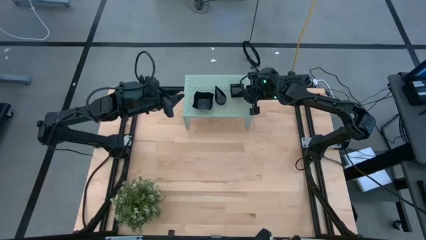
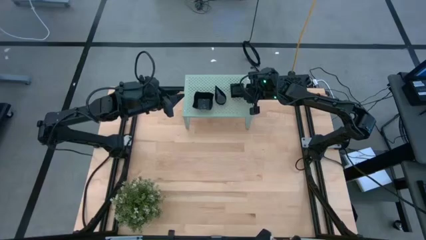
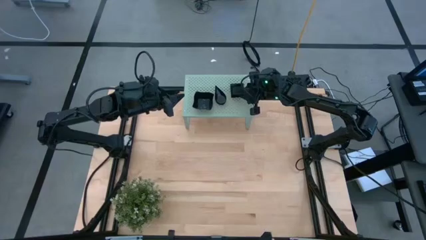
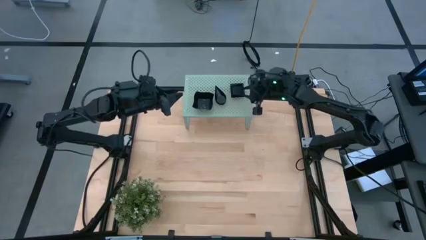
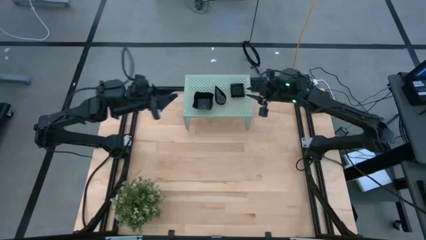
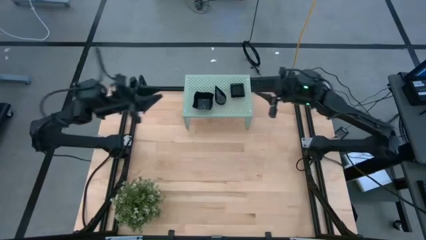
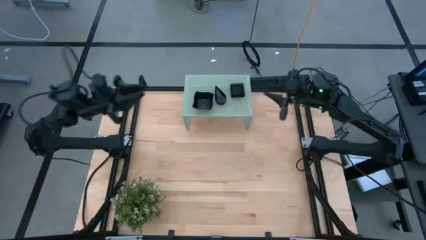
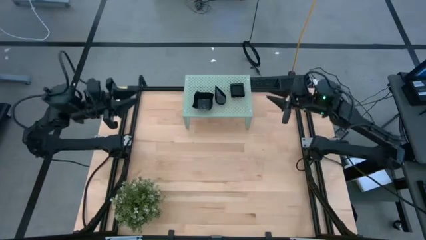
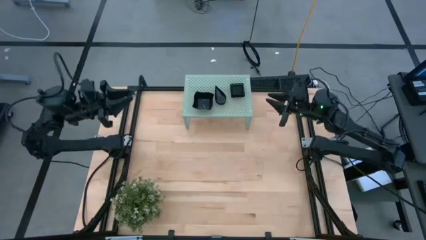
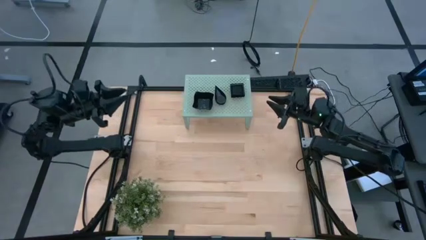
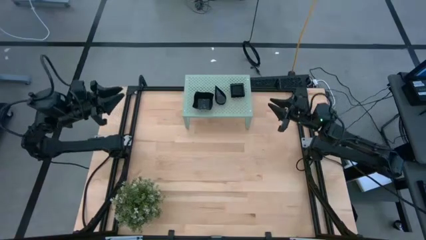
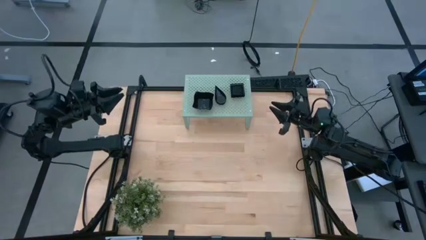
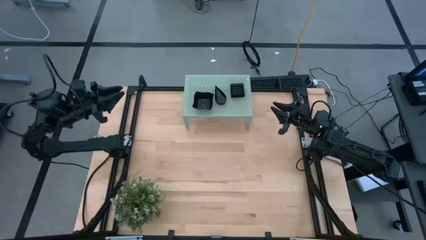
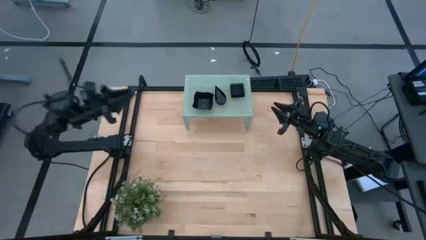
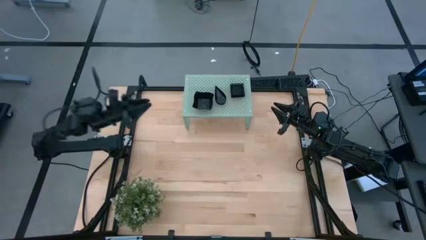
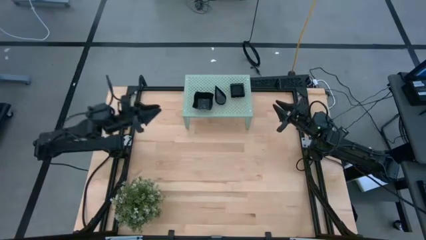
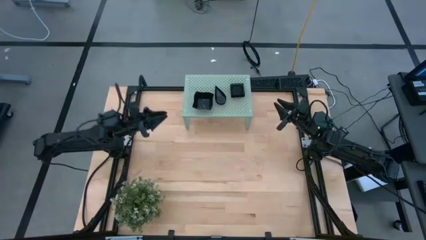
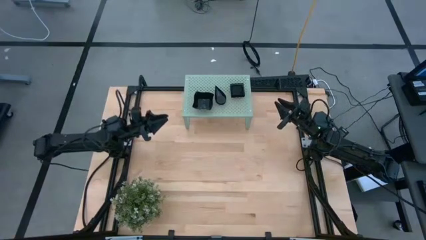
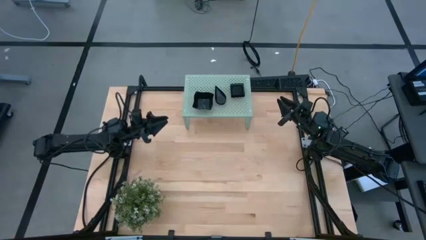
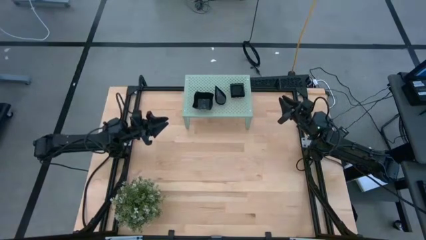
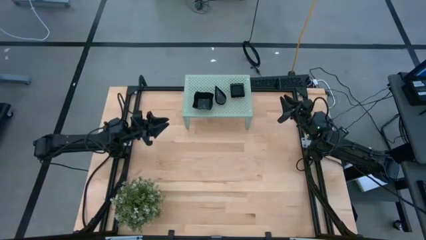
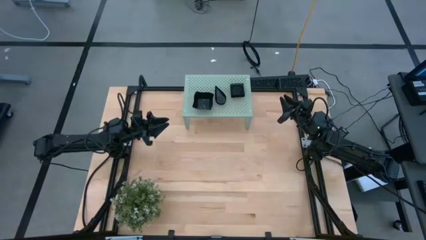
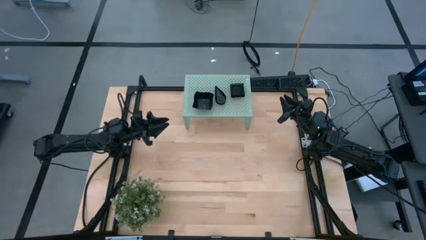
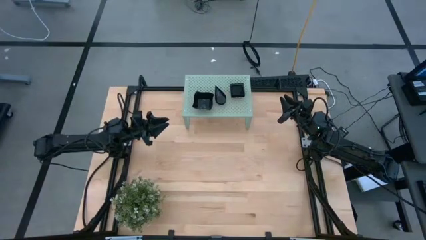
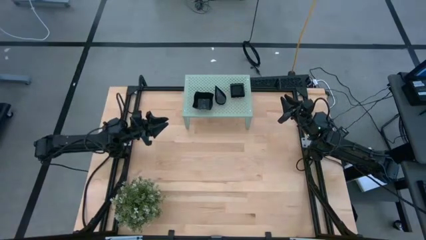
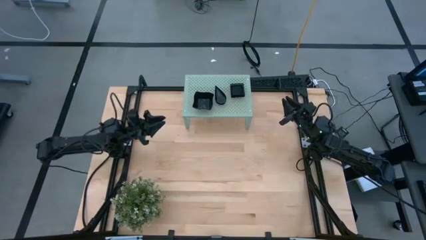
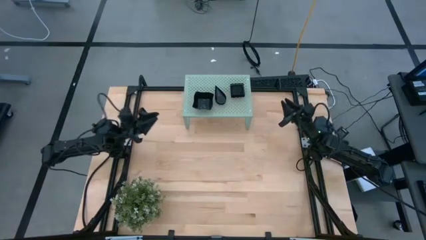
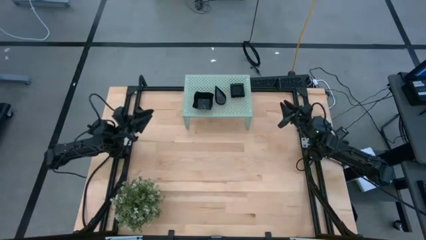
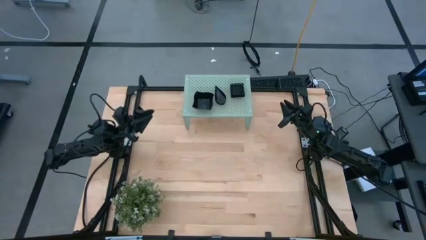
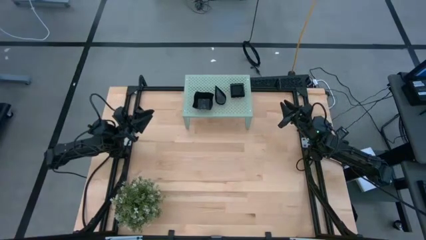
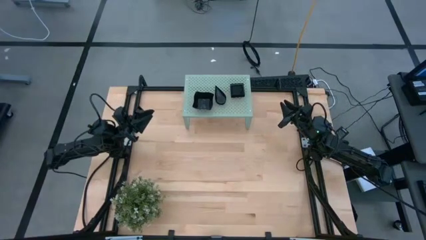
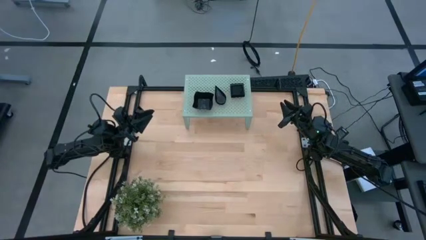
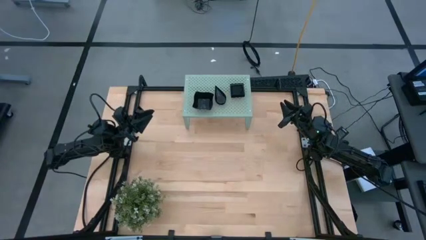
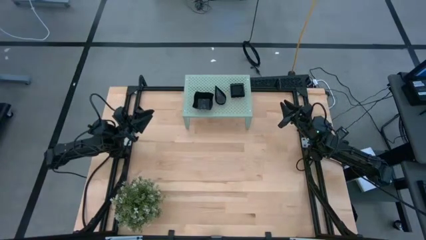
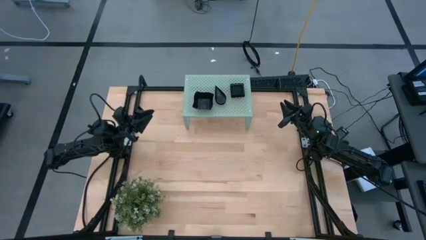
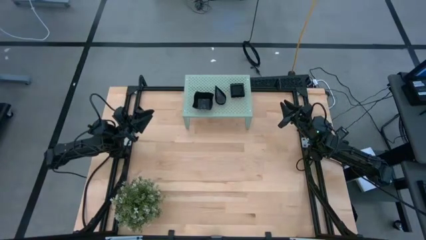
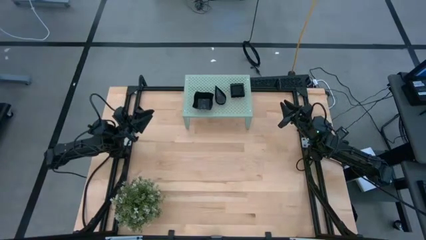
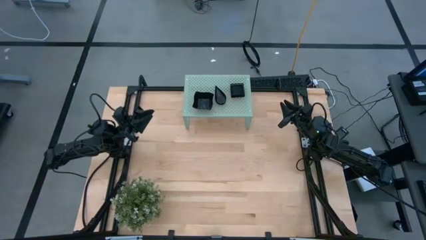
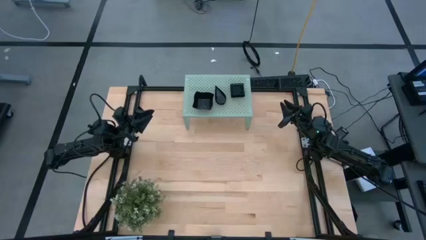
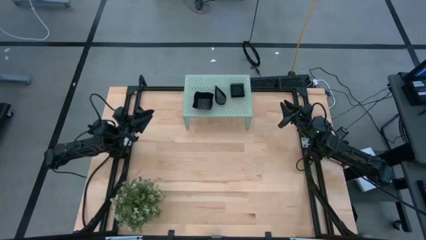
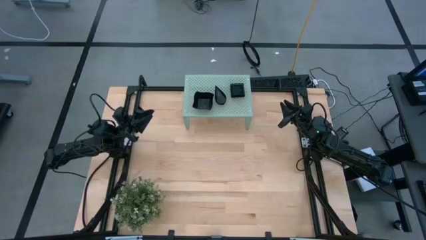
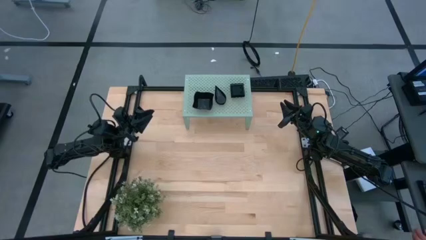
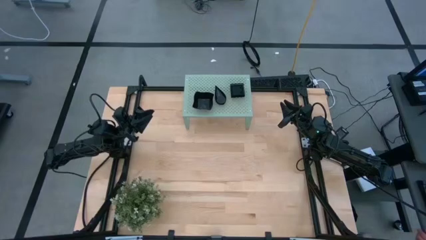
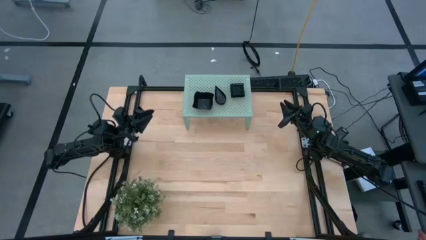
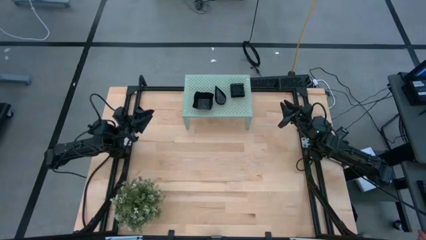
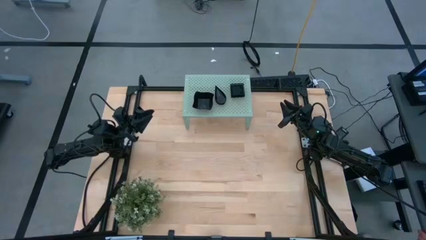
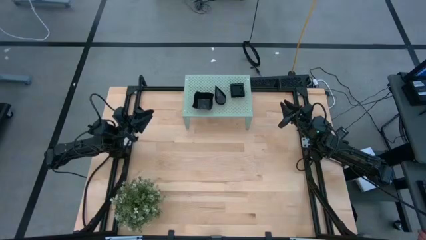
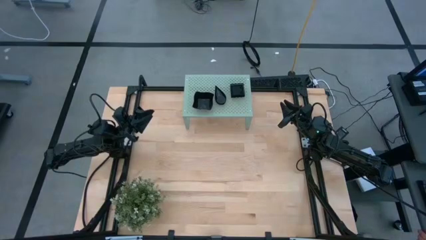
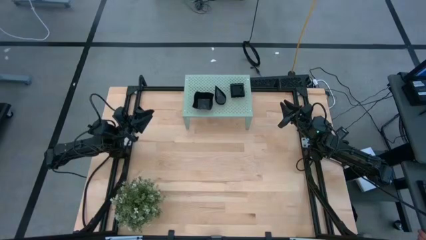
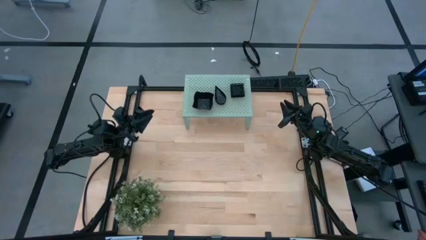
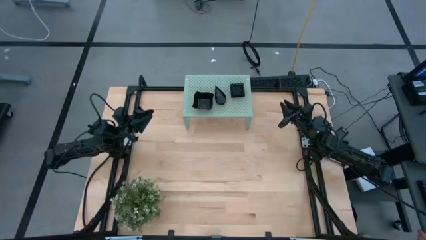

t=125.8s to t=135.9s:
Task: Pick & Place Mini shaped plates
Return to Home Position
